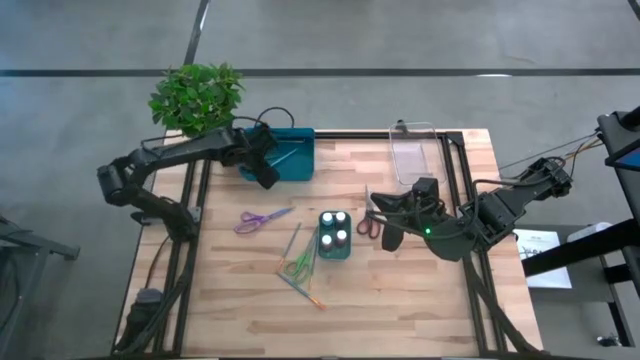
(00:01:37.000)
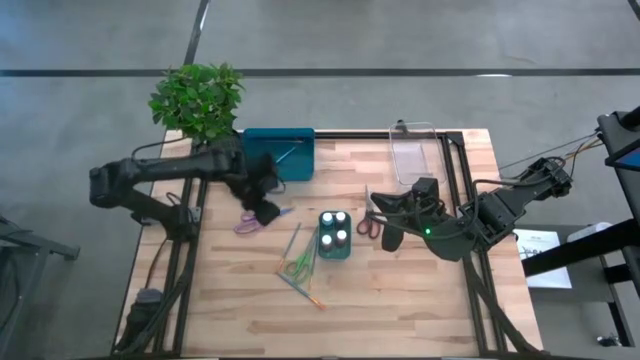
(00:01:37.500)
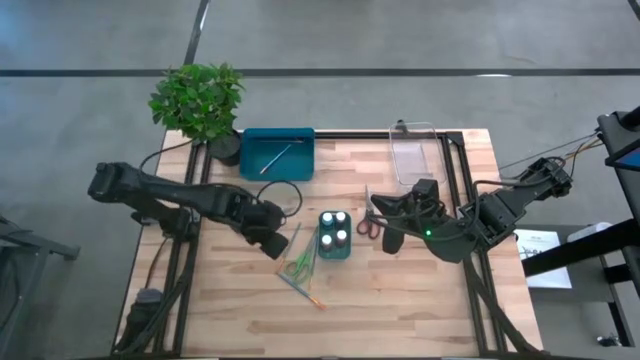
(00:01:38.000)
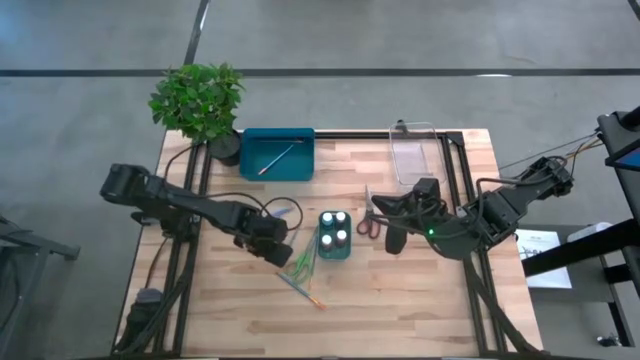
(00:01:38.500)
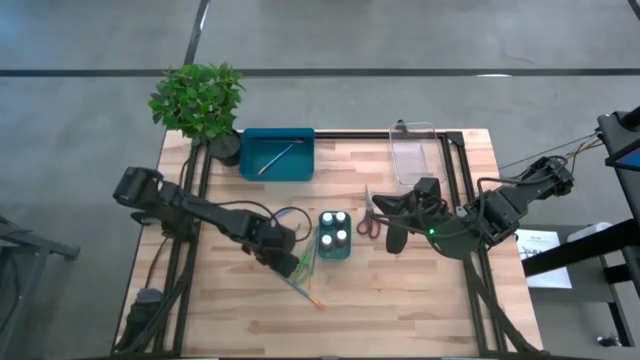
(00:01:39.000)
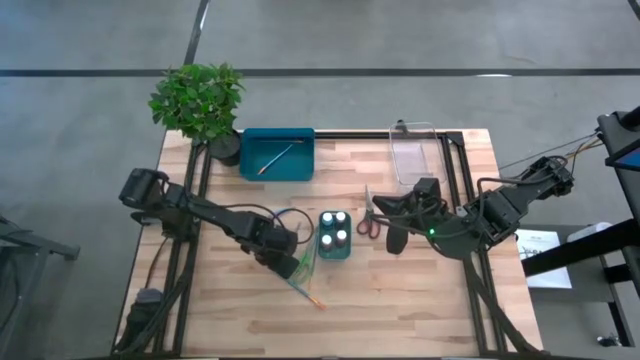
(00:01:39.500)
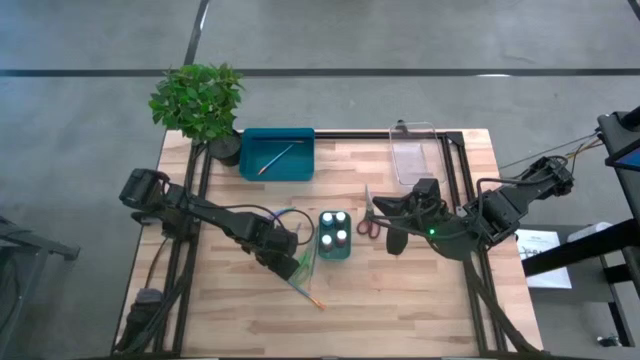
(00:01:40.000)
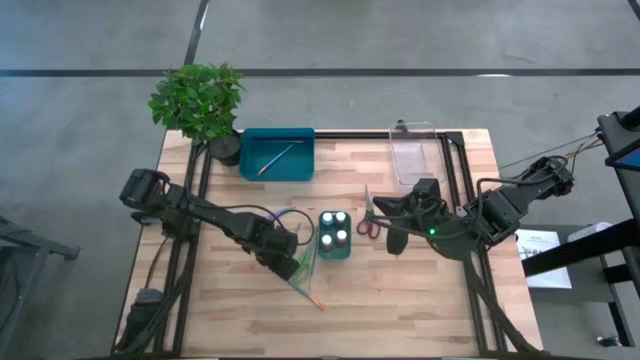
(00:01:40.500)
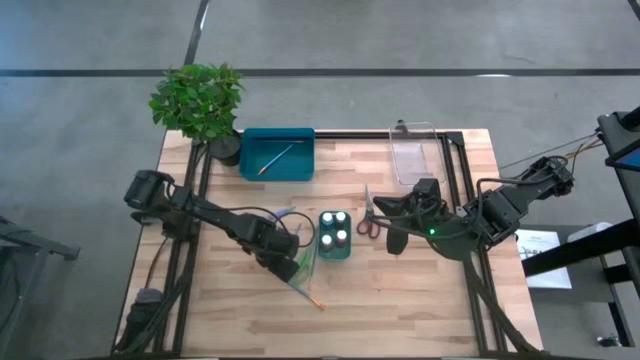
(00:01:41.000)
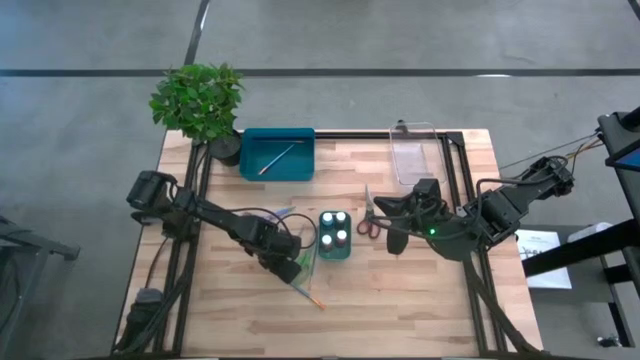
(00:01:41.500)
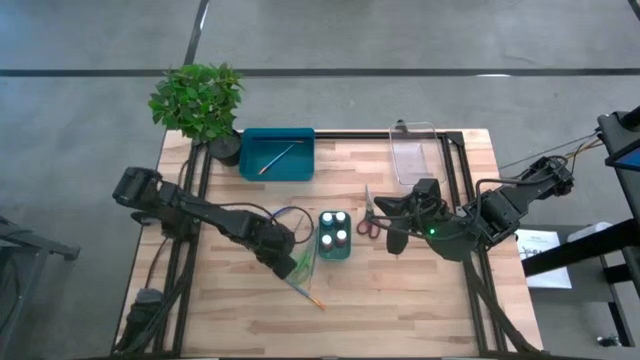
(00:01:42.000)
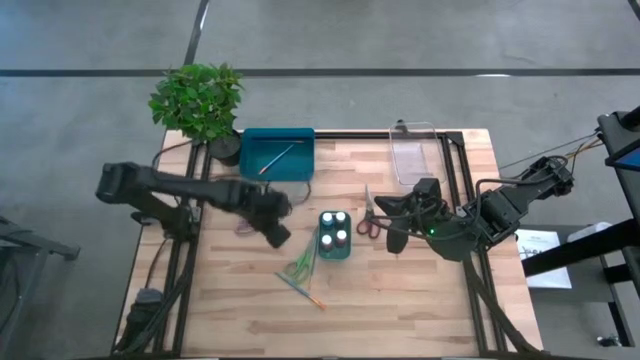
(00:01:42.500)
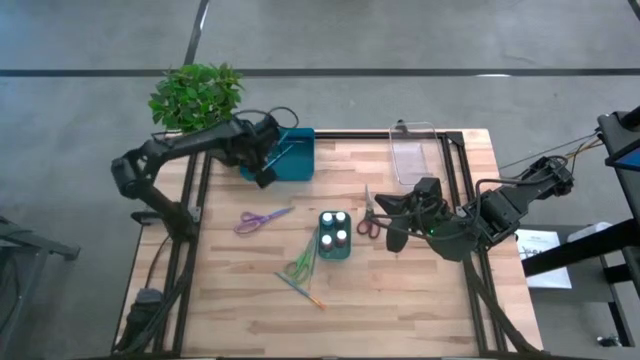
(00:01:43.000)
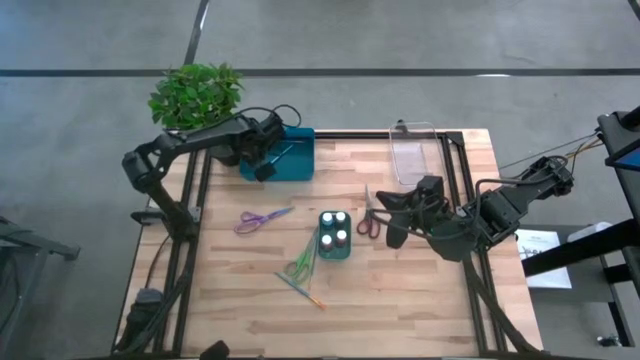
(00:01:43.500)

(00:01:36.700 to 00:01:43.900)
Task: Pick & Place Paint Supplies
Put the top big blue paint brush into the blue bin

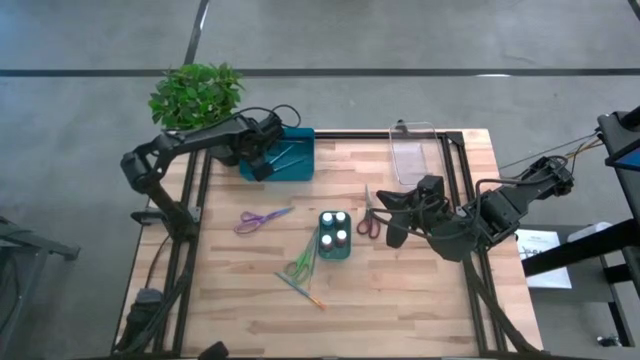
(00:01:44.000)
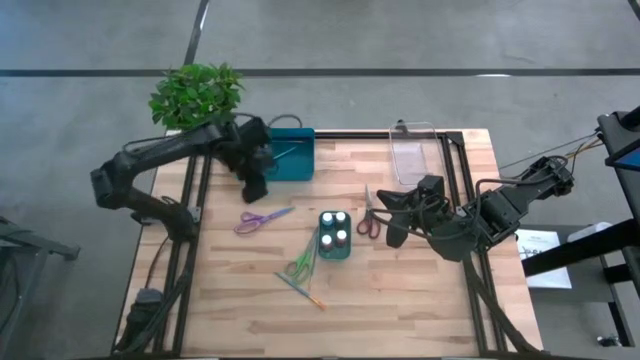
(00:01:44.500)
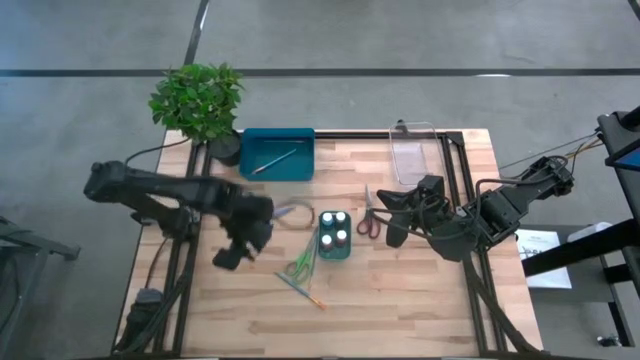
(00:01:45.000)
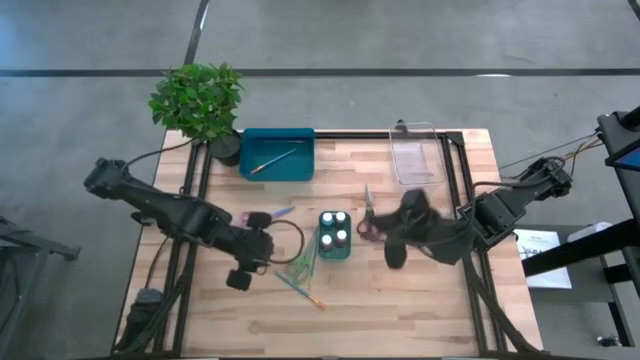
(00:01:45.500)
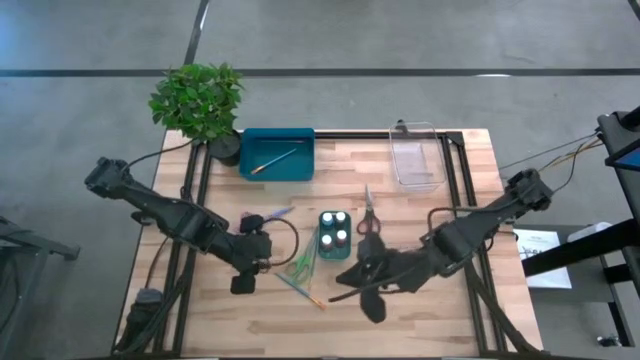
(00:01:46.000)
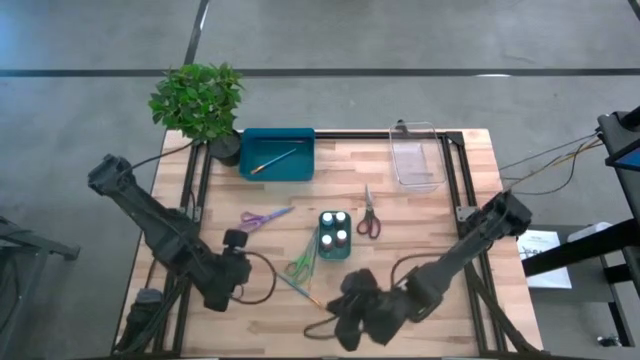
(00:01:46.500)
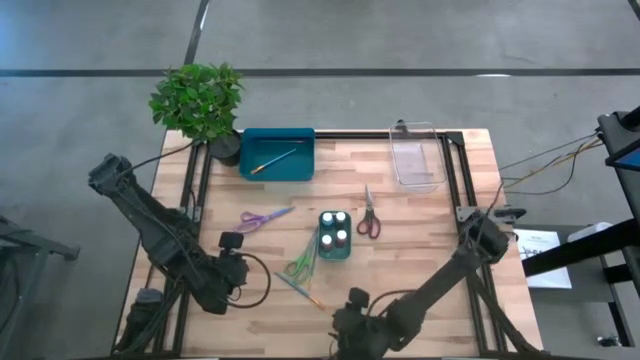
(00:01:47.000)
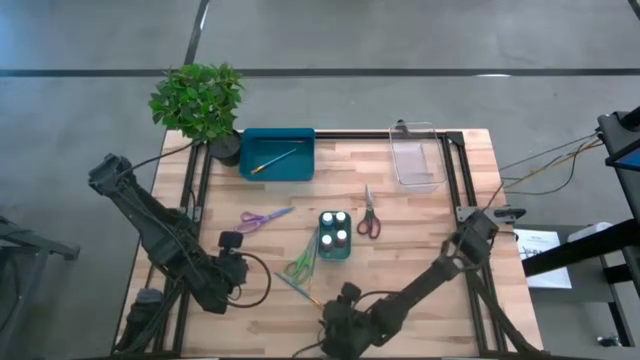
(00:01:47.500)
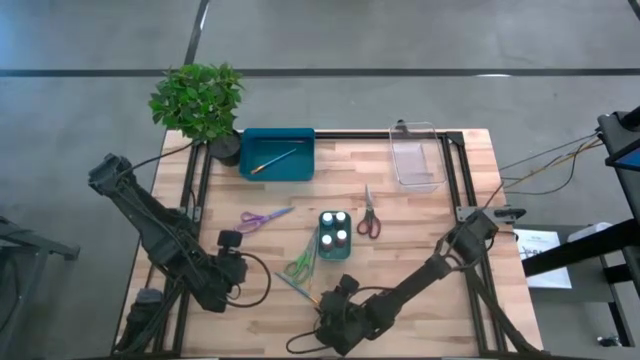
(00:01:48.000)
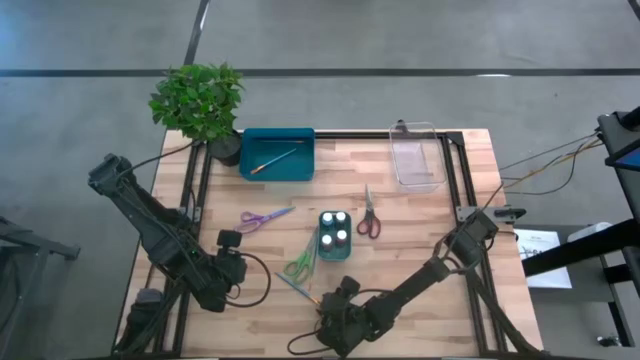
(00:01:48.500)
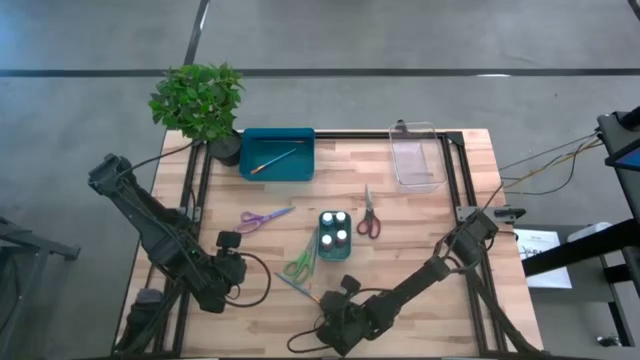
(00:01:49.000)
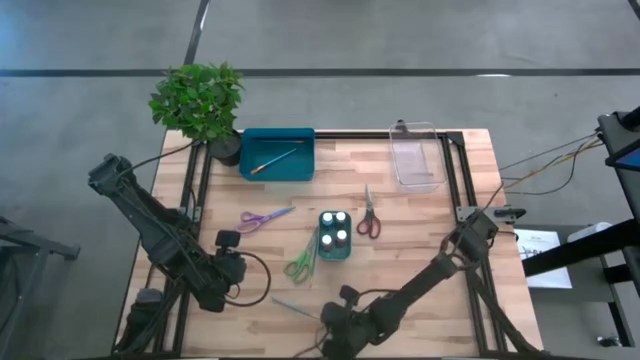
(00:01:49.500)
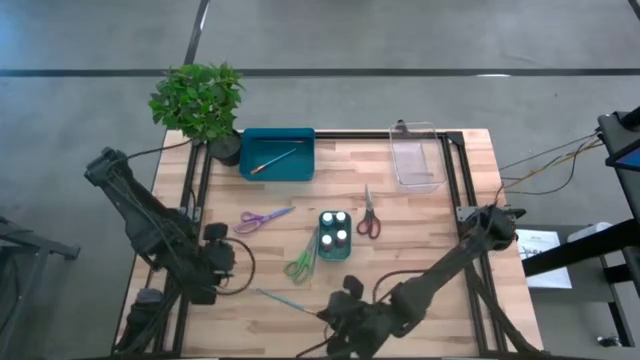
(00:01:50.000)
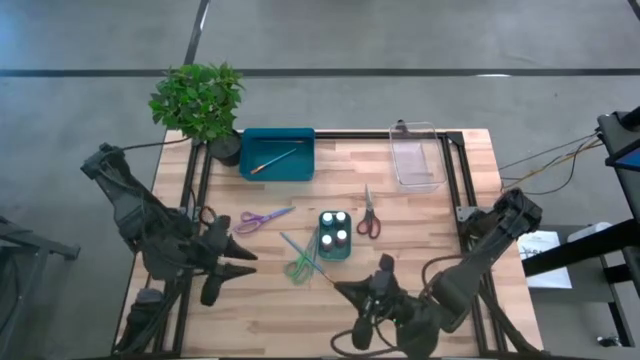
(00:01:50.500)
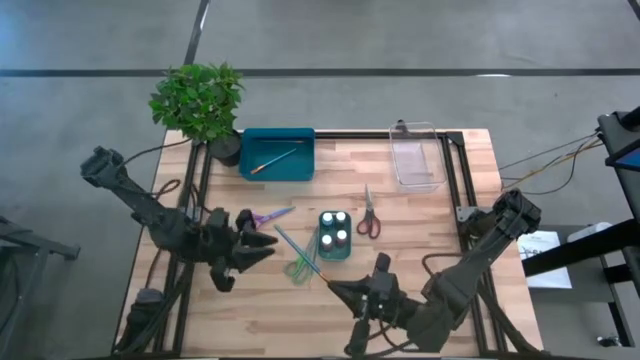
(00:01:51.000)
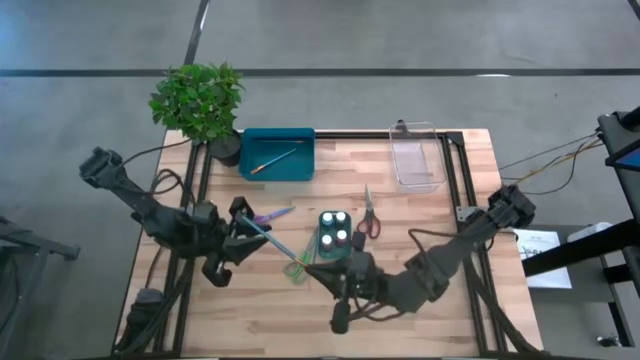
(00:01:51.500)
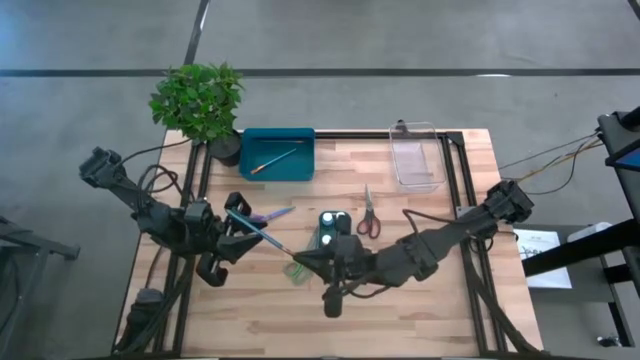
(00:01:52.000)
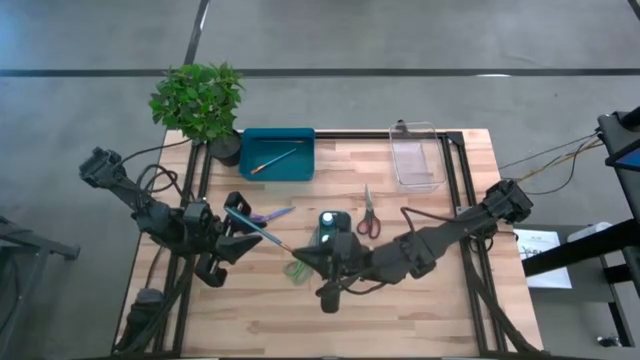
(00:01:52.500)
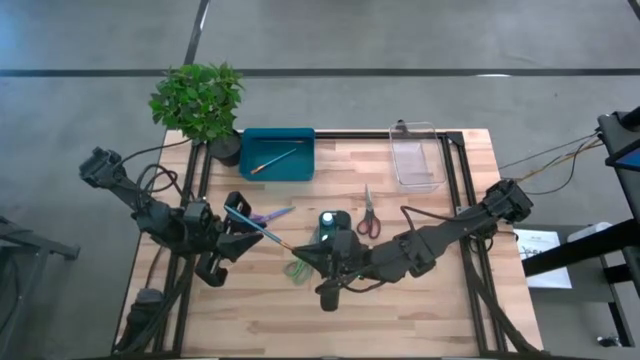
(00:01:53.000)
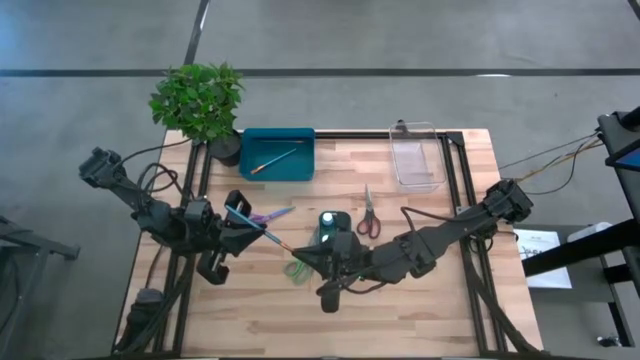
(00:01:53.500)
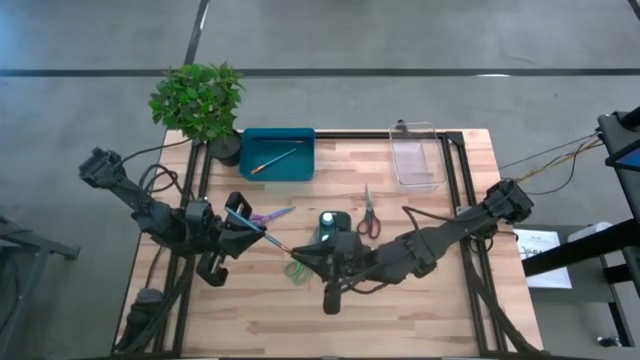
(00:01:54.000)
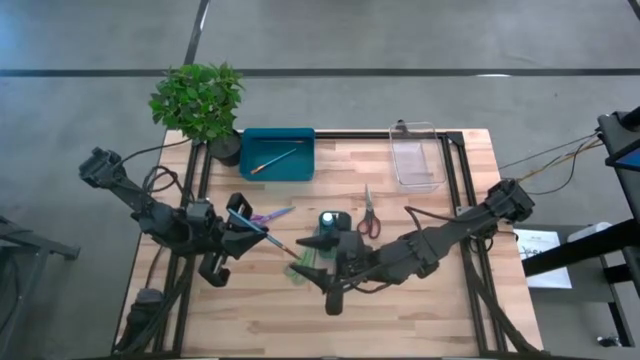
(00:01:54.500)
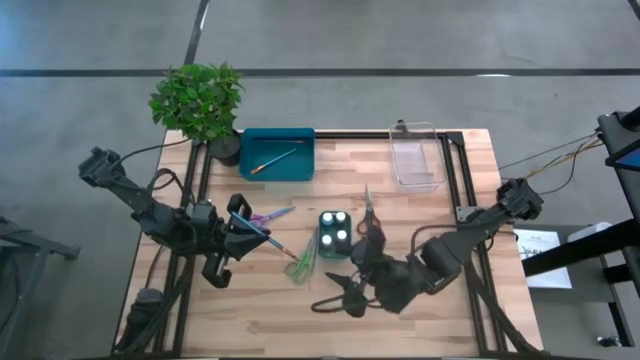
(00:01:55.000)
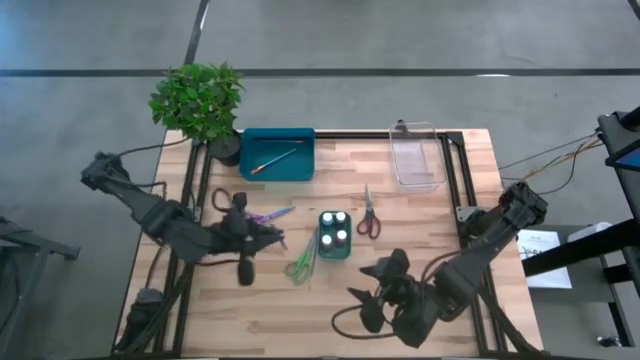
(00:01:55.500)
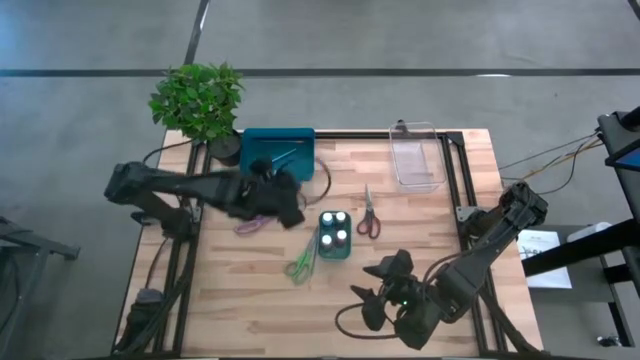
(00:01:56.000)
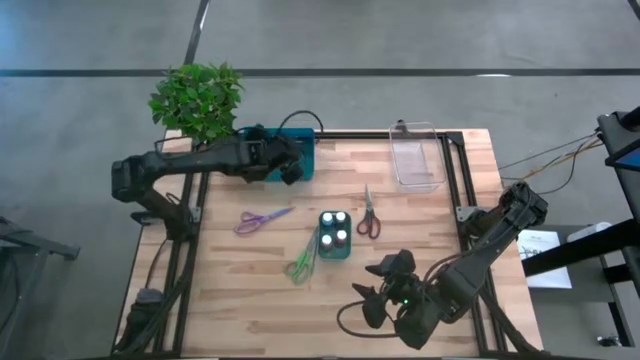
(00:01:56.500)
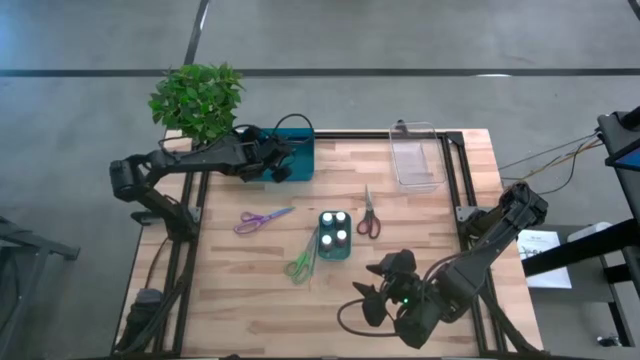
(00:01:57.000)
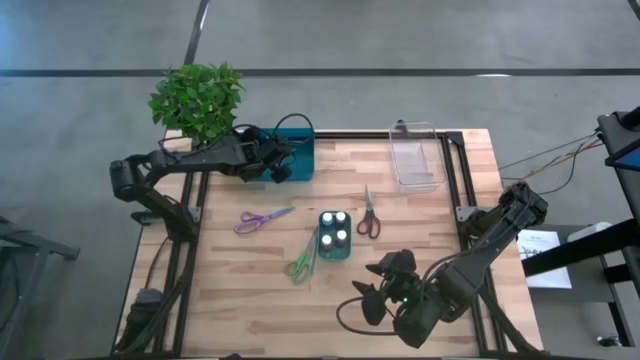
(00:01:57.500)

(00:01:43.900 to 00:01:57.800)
Put the big blue paint brush into the blue bin
